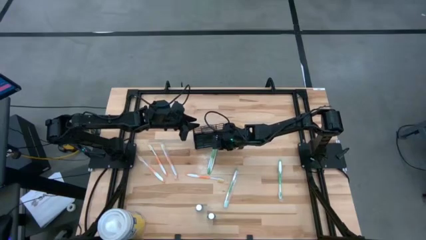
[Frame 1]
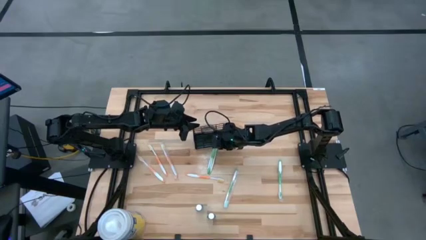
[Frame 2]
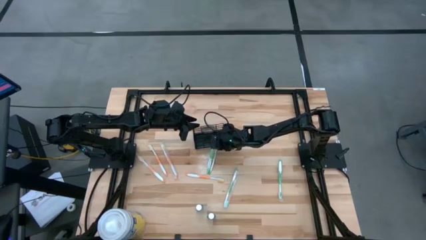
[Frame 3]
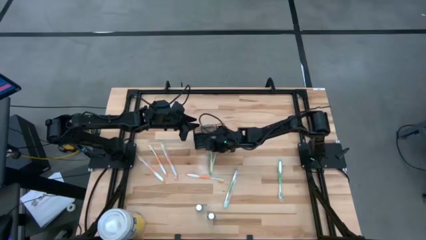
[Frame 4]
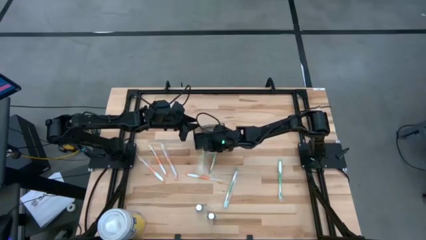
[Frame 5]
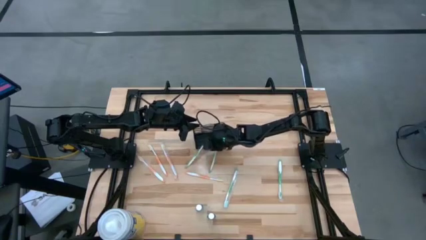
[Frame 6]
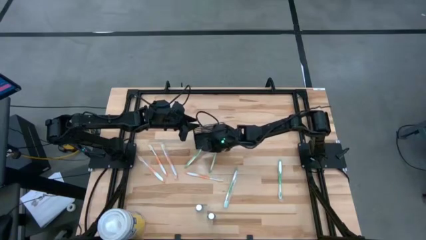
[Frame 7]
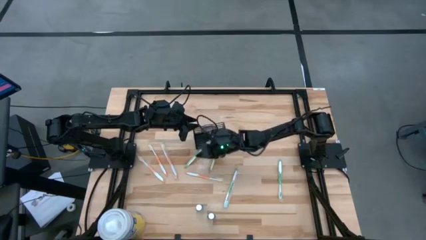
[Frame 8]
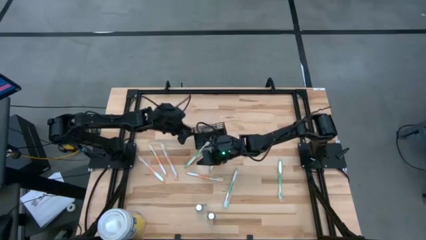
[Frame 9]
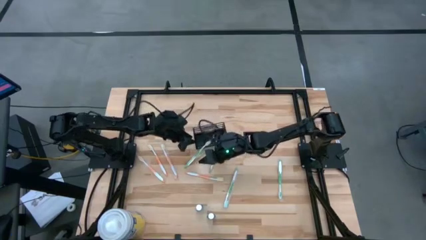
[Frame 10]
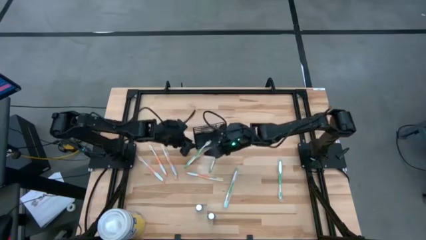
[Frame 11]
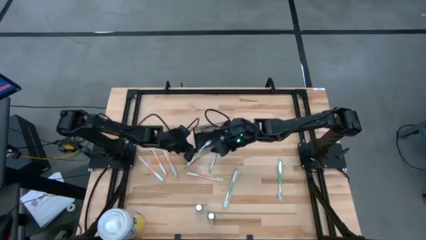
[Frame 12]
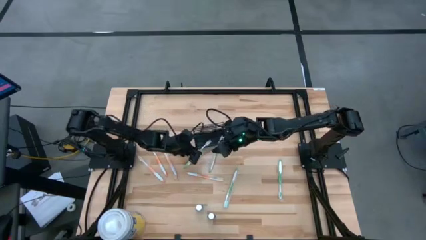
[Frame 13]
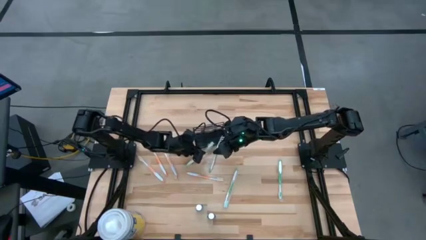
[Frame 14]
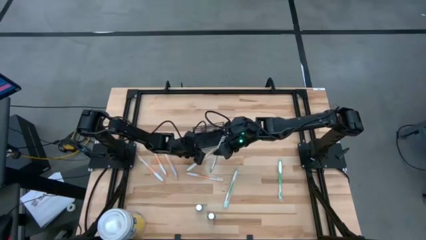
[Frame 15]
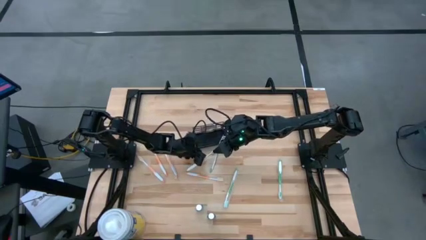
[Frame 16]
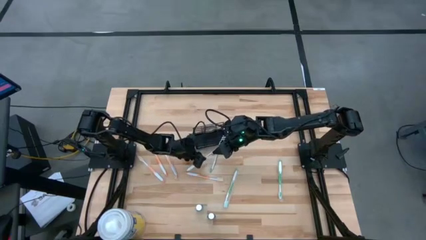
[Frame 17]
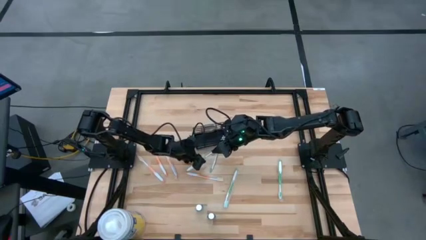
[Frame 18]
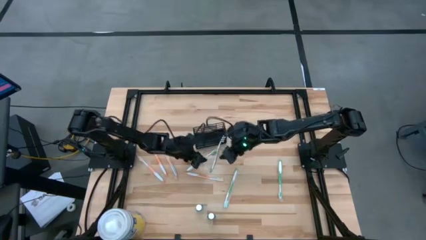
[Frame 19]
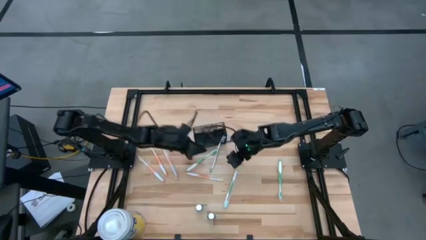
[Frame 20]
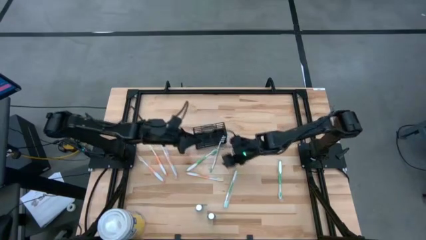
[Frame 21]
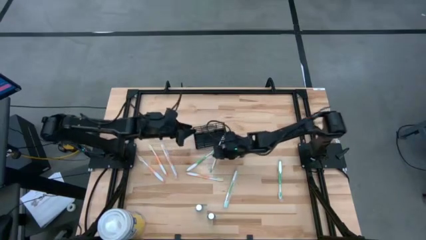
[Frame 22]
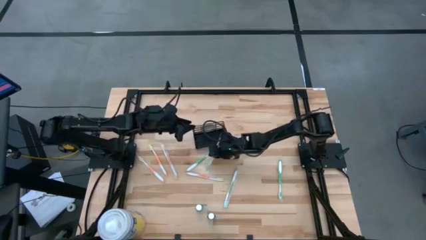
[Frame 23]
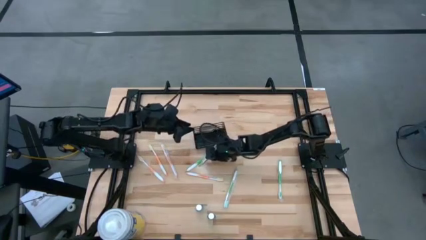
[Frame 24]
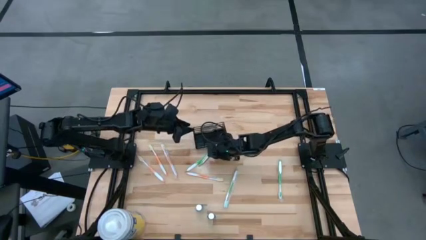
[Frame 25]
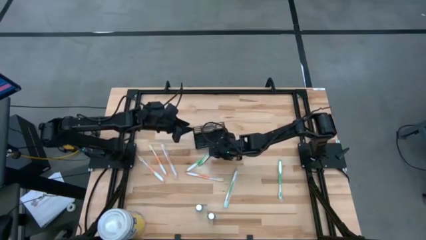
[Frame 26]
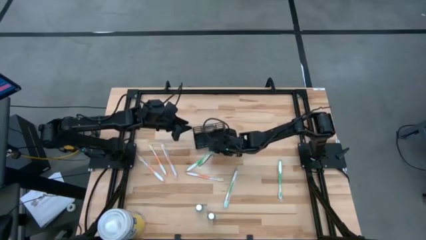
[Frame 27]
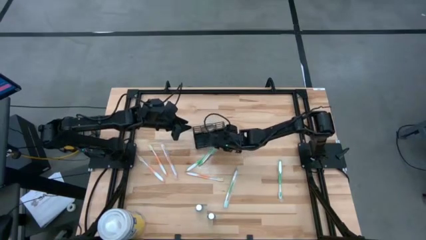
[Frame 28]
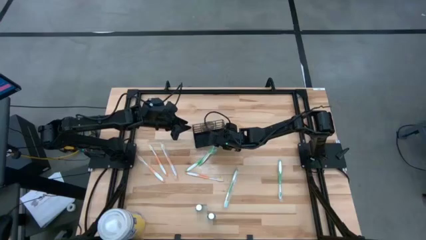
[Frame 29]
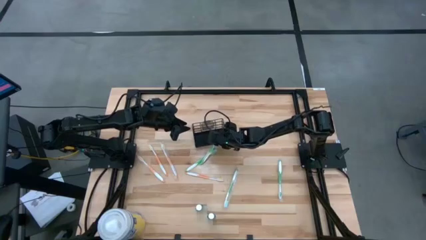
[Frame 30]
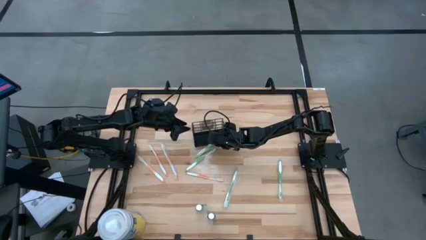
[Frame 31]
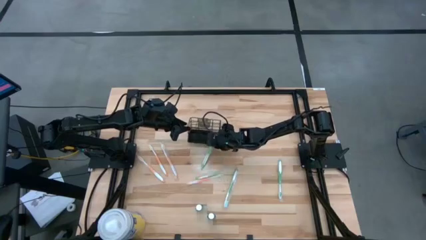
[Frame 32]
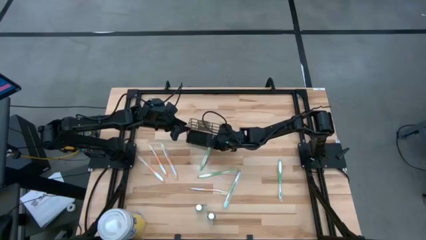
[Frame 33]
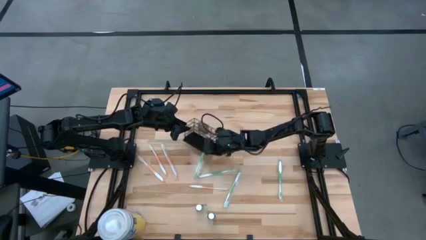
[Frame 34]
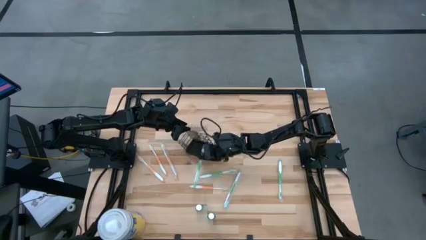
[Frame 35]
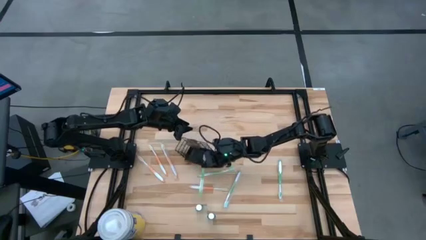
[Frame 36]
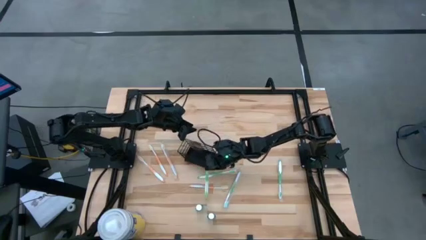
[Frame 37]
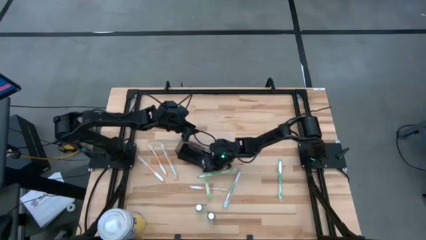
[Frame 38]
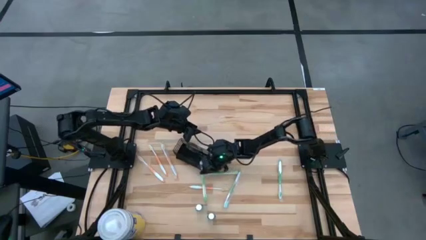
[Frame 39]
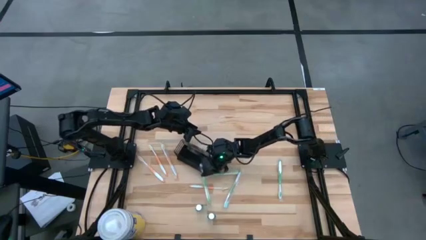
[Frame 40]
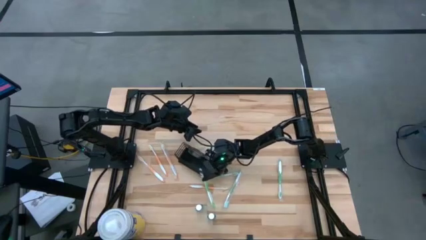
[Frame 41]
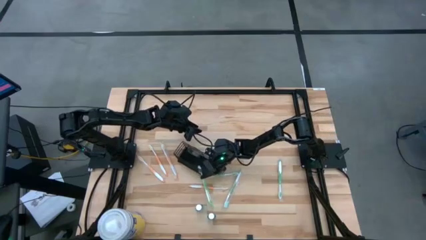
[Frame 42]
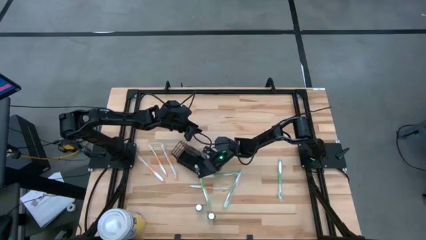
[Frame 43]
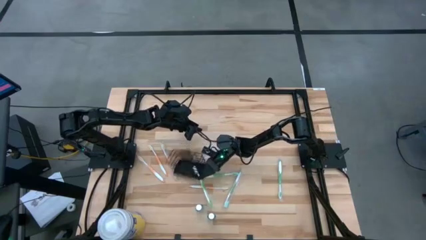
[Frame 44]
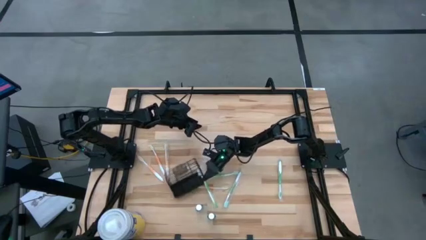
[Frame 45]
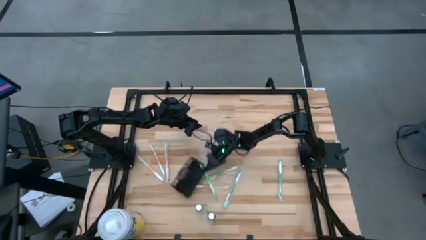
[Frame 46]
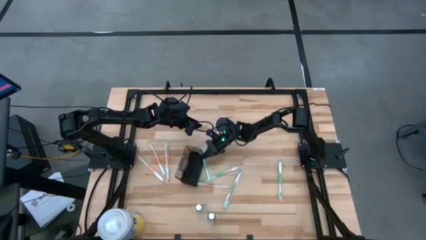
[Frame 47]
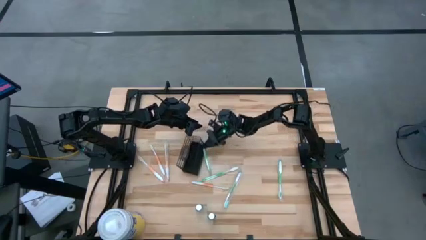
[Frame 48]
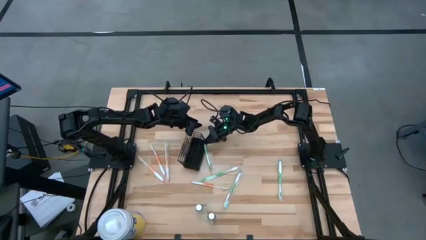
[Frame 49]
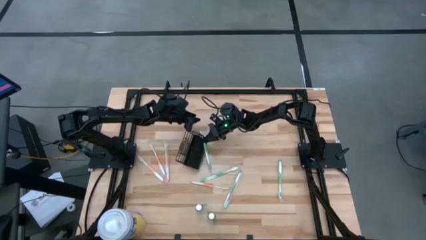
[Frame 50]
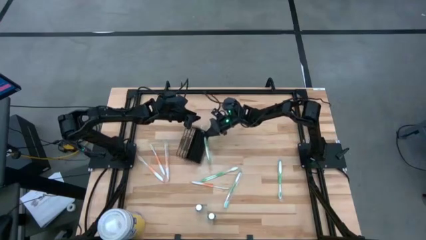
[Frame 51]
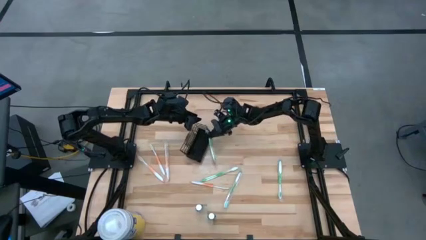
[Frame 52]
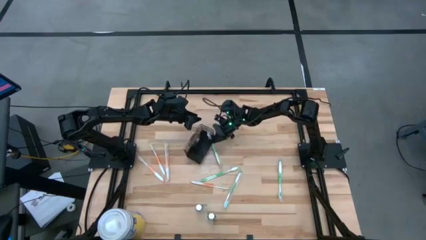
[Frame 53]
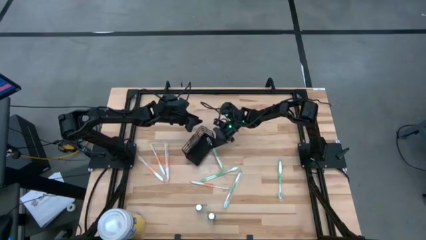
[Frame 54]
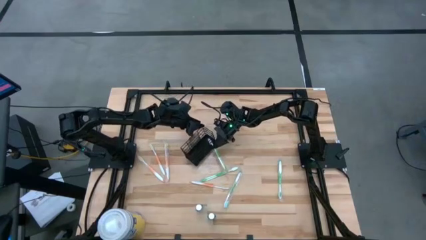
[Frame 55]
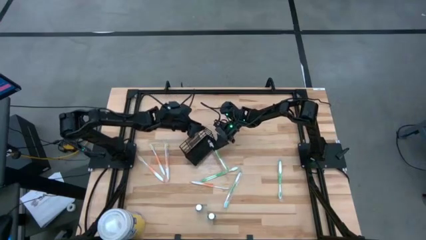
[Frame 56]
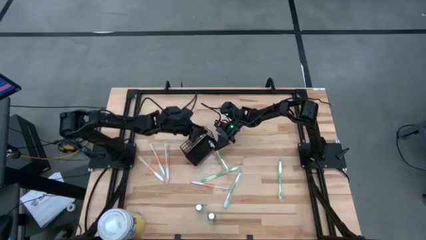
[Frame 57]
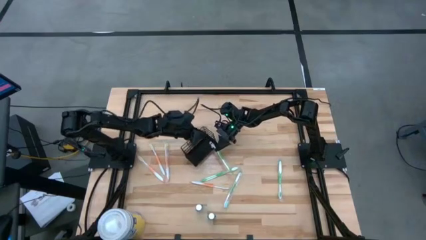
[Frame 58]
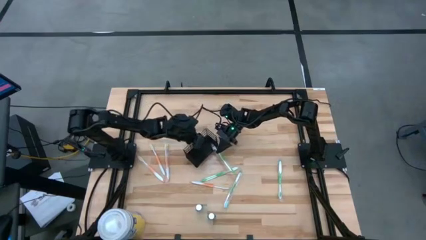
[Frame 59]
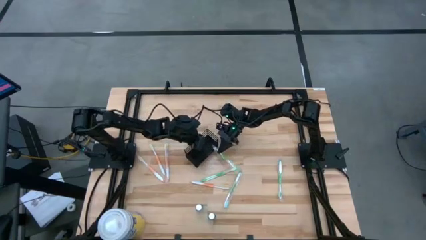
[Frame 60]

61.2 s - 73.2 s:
Task: Pick & Place toothbrushing station
Remove the green toothbrush from the wire organizer

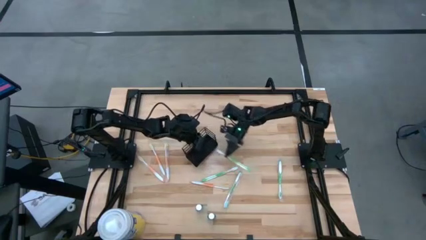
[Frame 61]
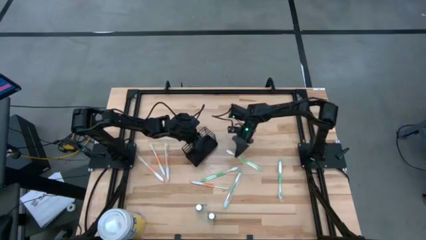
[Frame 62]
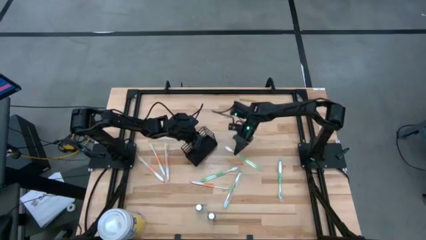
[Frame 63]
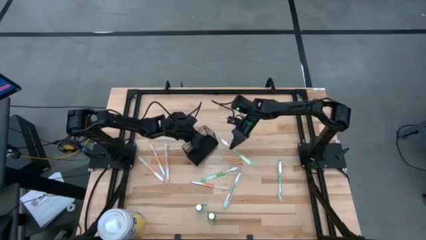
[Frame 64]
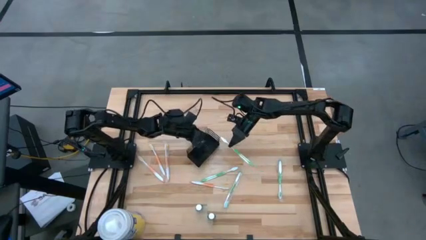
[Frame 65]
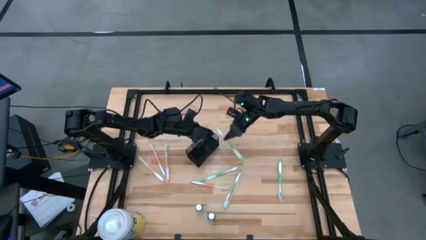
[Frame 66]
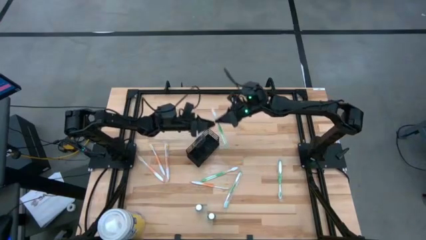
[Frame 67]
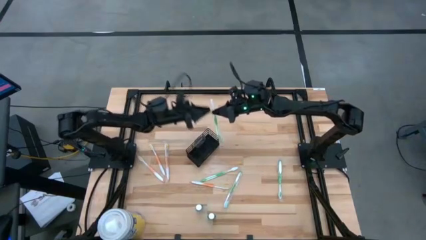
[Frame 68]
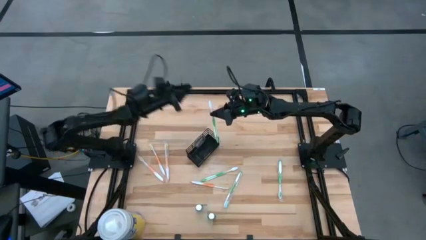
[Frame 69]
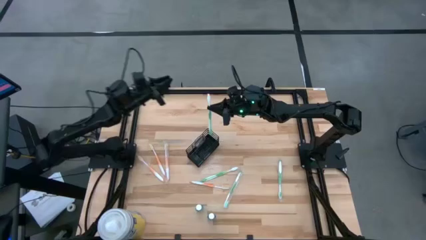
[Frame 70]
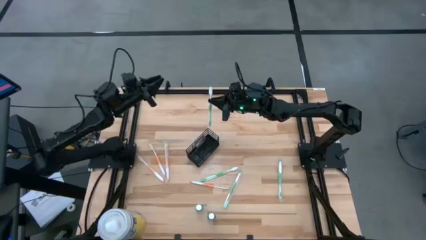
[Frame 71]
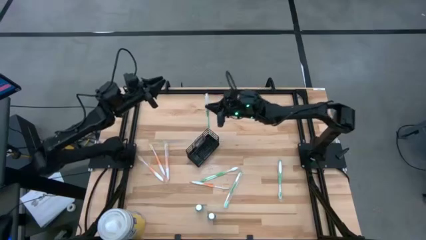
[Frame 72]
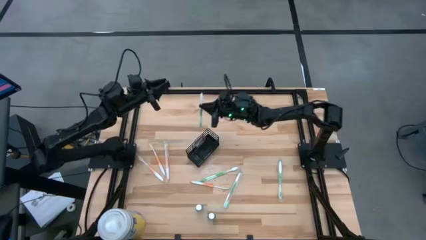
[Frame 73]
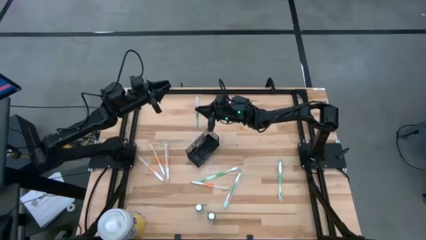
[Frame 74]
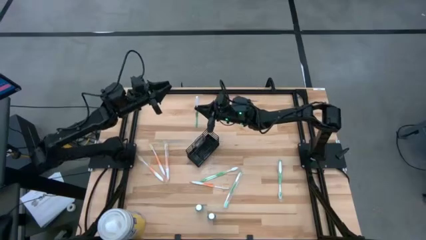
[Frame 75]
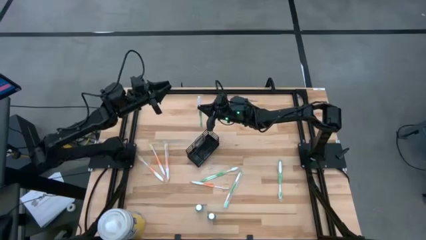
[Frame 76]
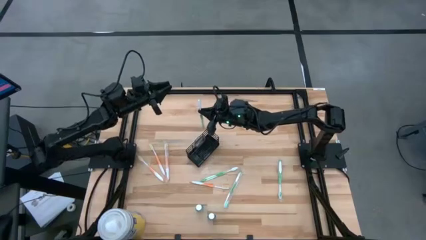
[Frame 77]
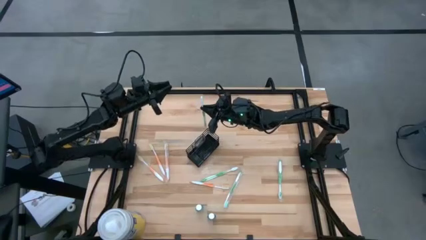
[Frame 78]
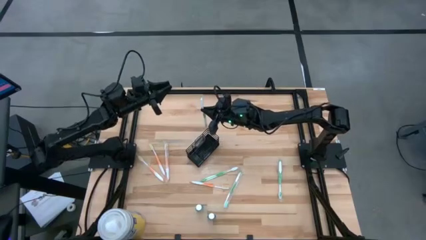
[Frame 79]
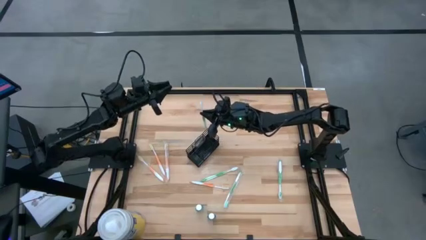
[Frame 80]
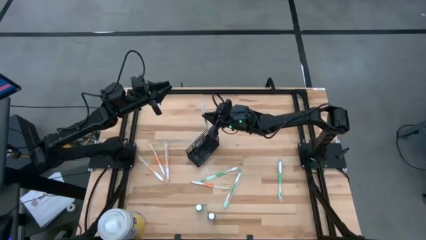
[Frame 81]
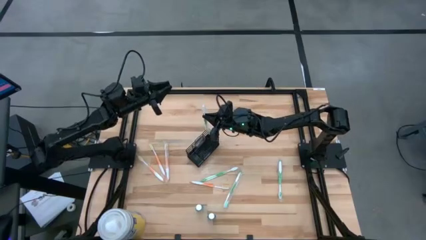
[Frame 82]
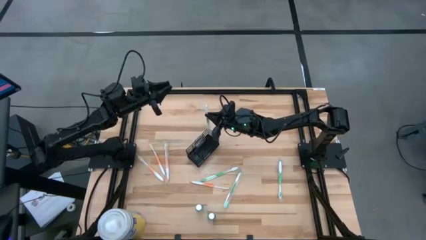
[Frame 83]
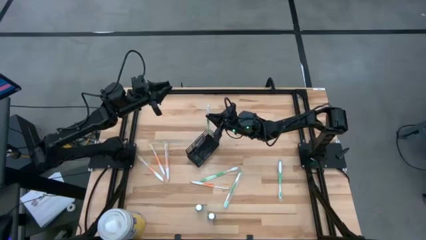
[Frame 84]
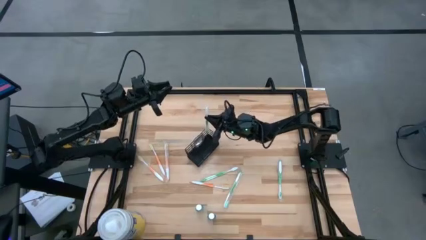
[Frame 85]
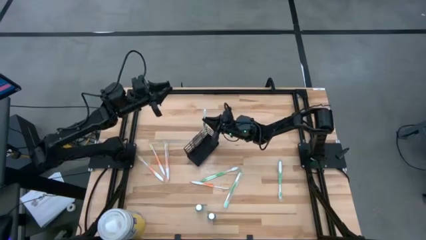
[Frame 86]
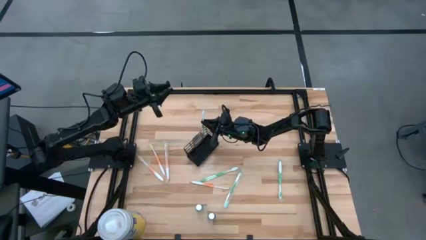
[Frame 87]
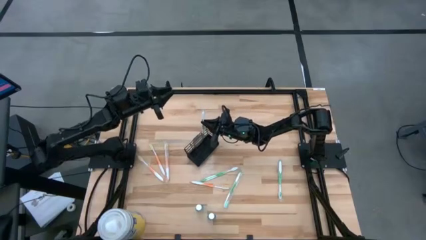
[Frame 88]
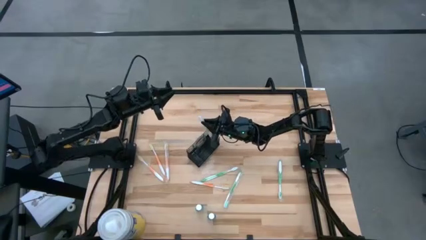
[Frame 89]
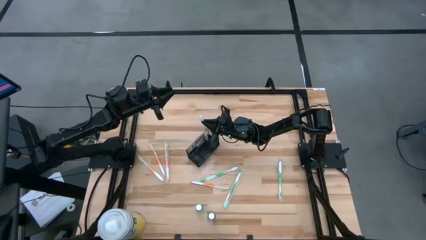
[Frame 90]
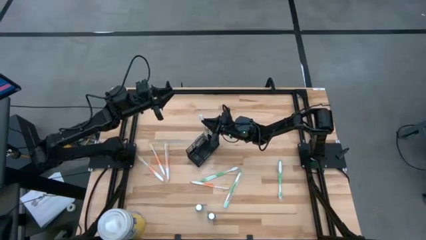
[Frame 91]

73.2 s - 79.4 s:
Put the green toothbrush into the wire organizer
